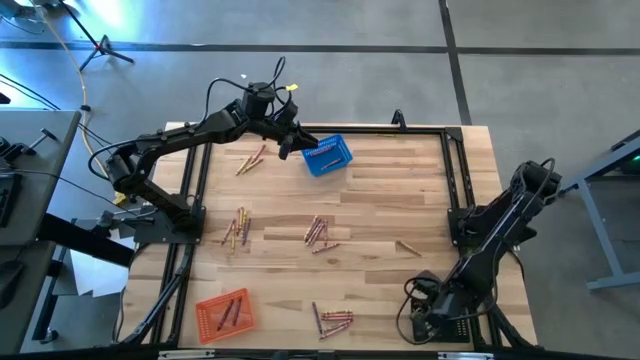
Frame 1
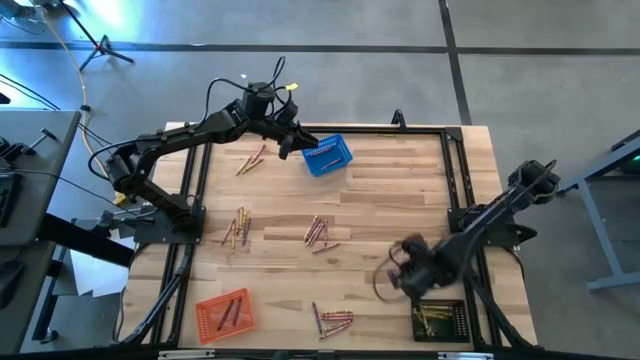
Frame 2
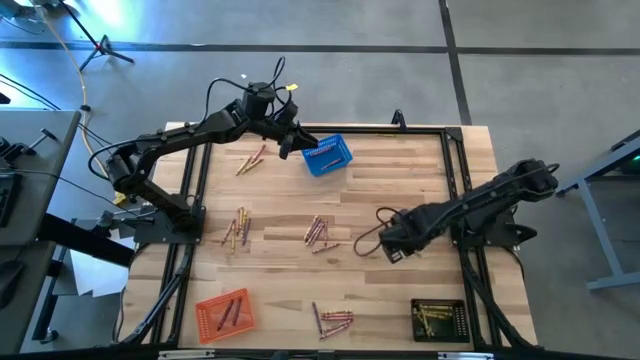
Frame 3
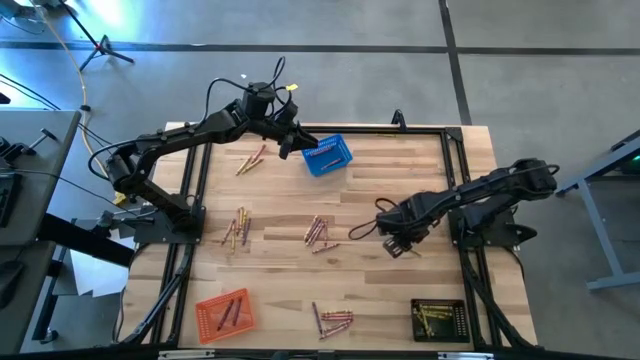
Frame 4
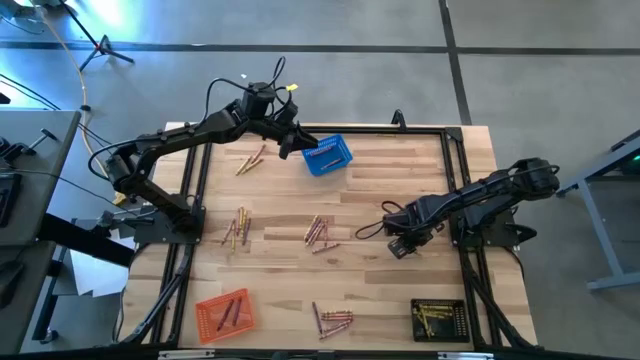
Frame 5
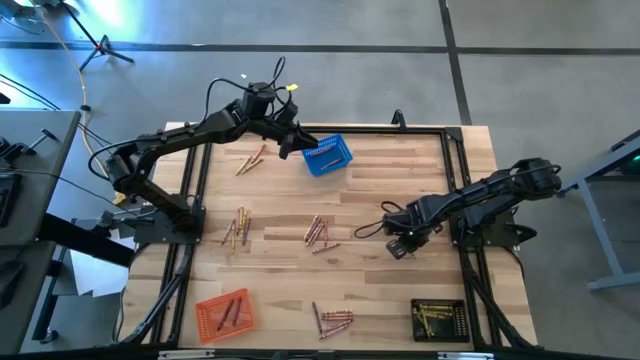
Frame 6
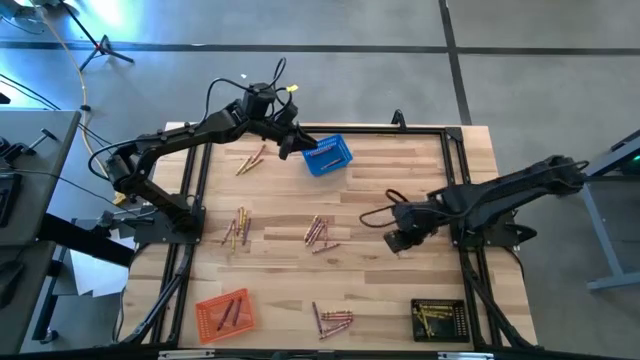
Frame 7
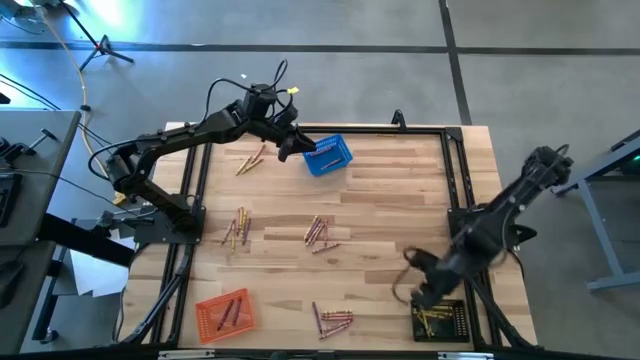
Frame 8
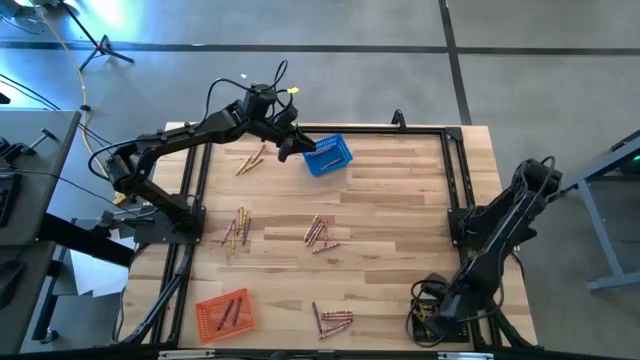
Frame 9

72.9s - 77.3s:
Task: Sort crayons
Put the yellow crayon into the black bin

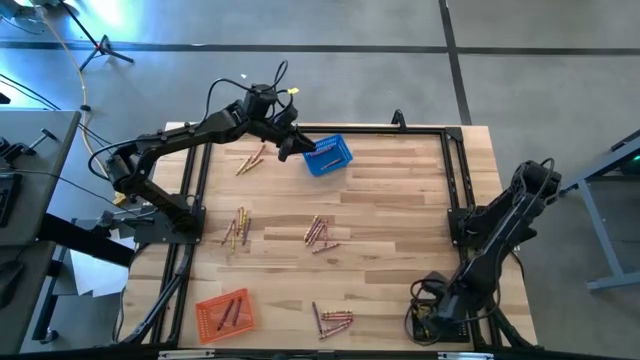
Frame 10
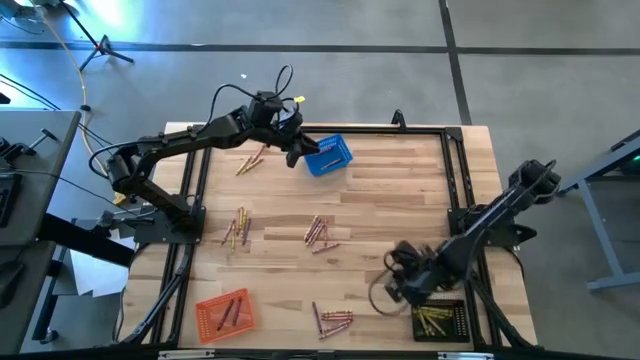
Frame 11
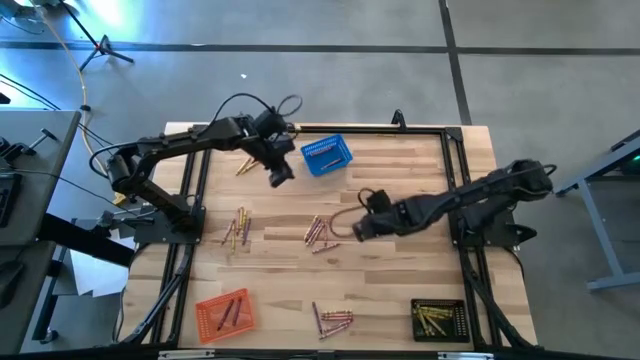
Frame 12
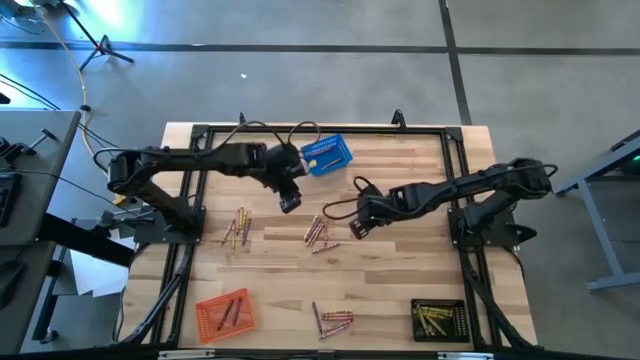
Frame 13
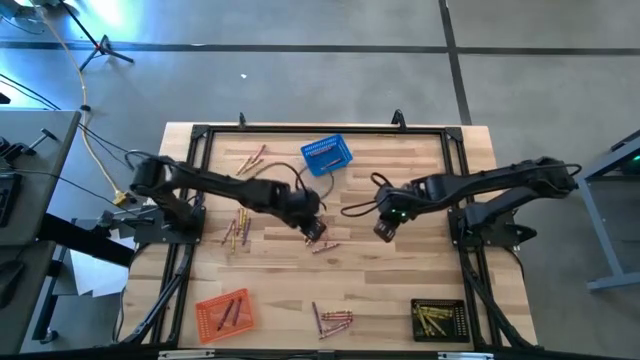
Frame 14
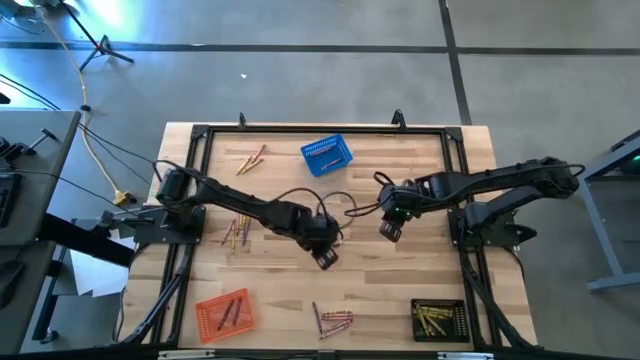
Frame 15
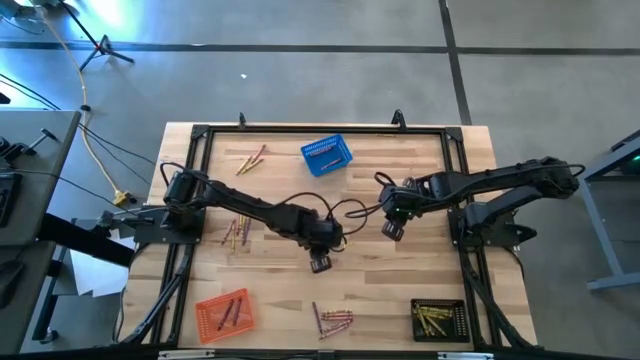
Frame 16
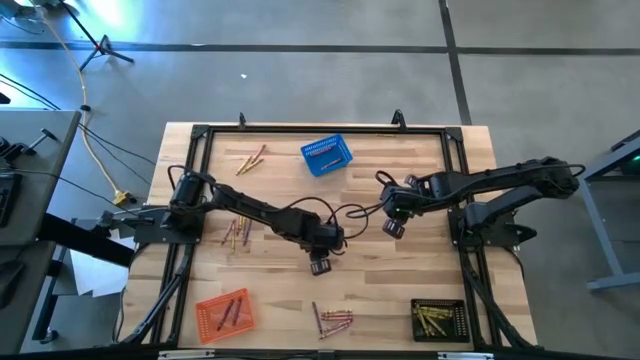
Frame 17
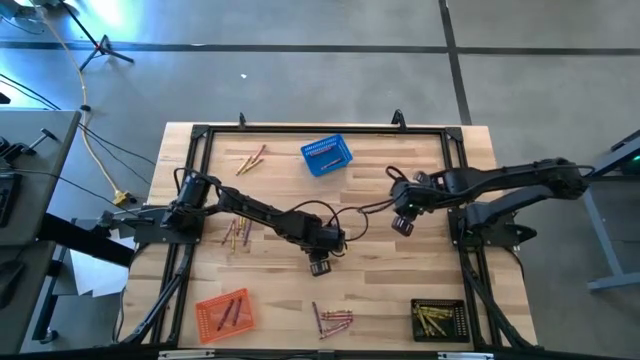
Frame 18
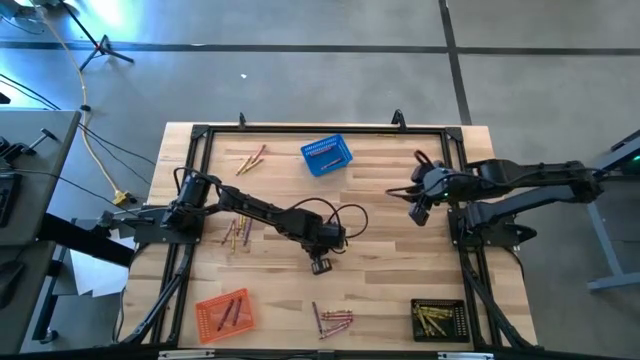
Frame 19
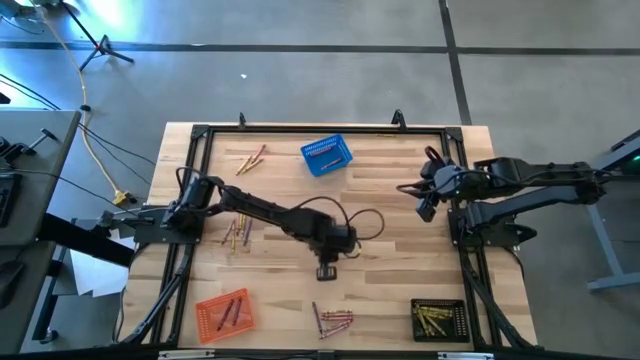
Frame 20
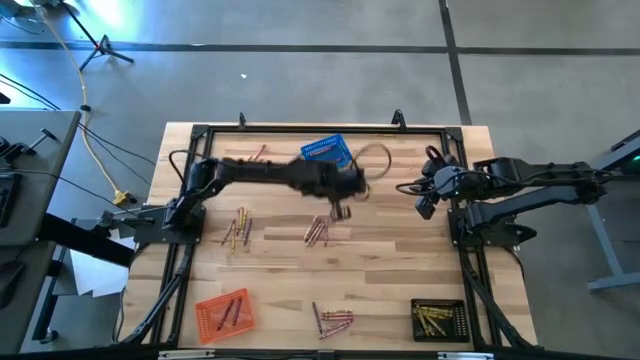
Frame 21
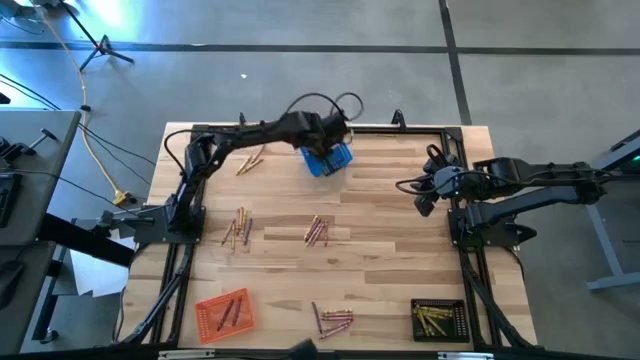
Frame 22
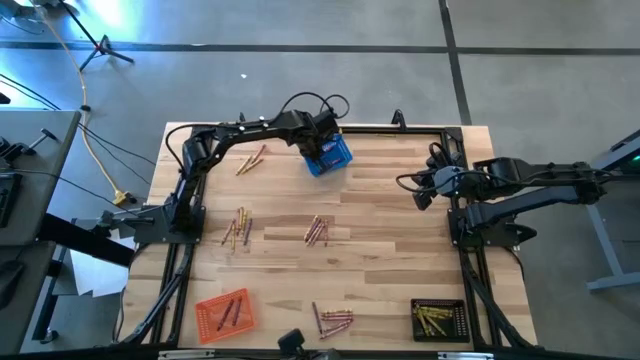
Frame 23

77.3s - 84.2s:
Put the red crayon into the blue bin

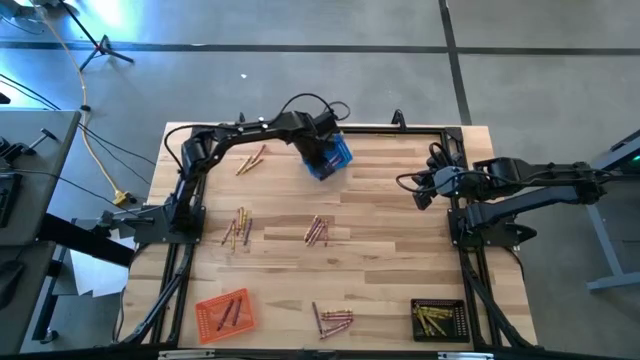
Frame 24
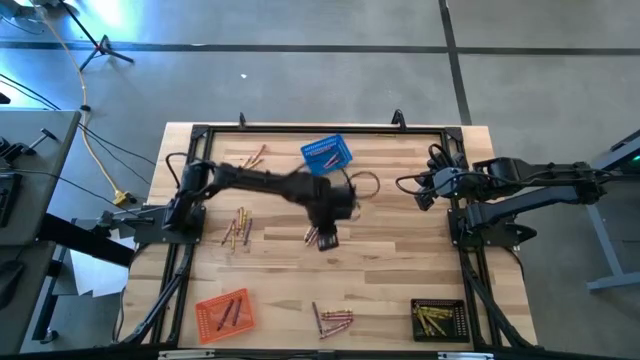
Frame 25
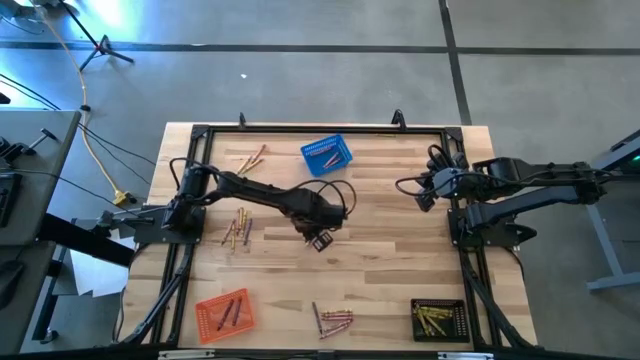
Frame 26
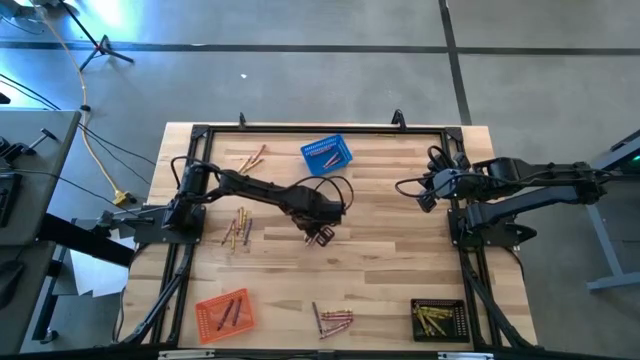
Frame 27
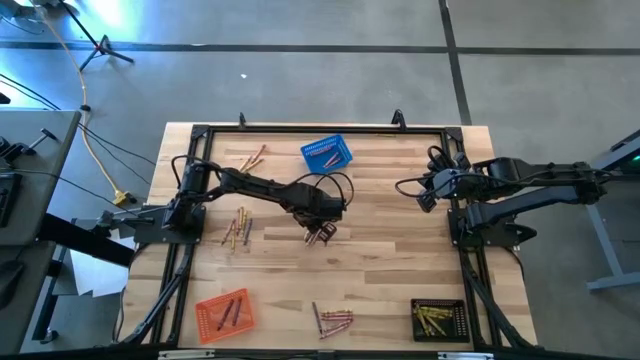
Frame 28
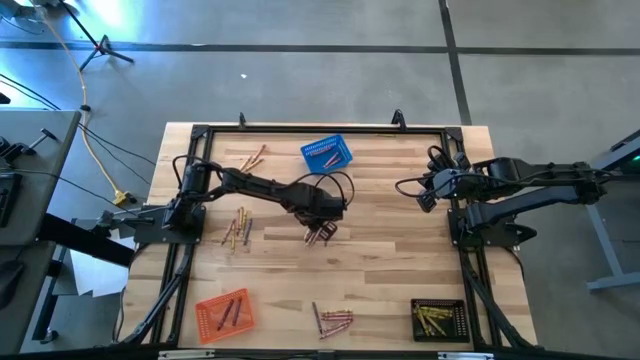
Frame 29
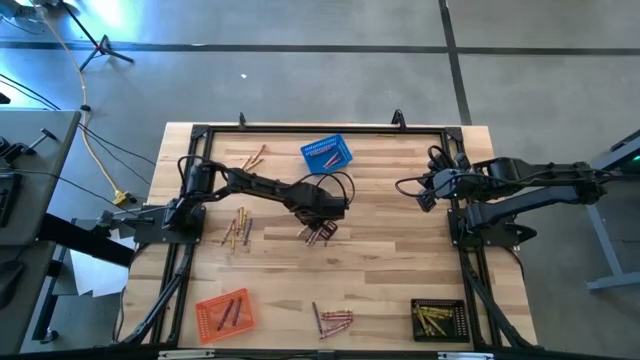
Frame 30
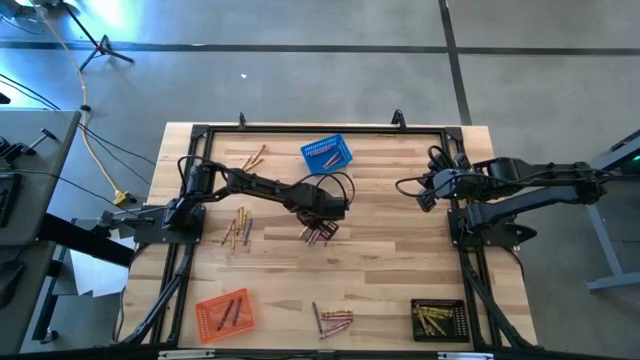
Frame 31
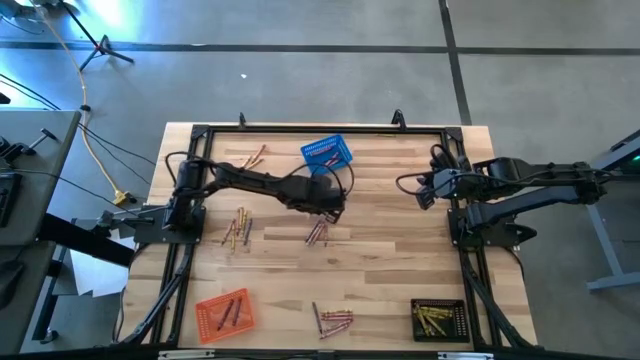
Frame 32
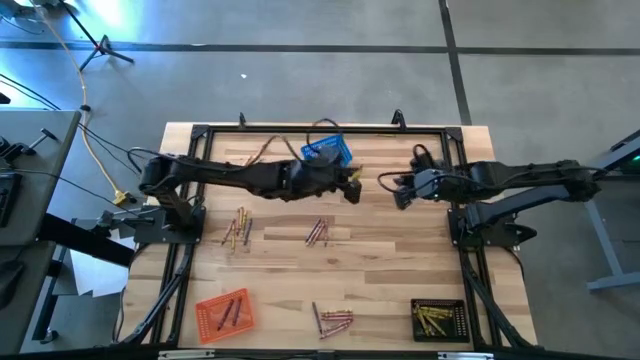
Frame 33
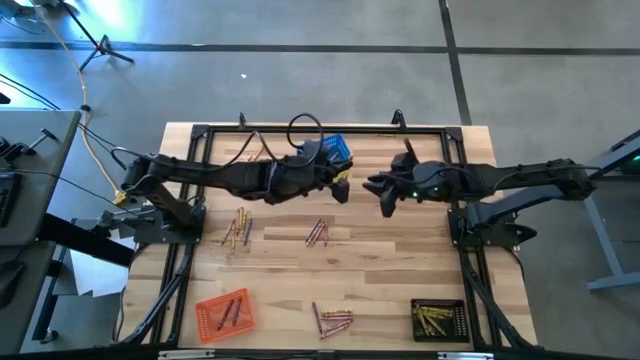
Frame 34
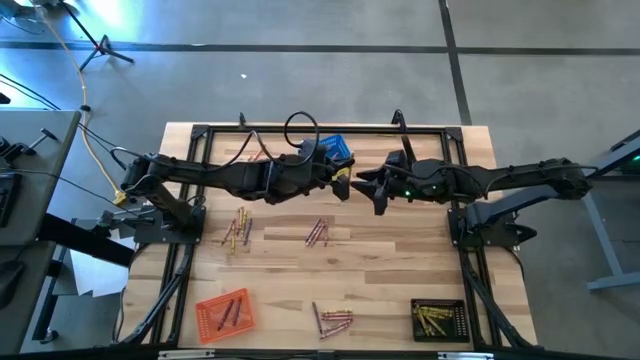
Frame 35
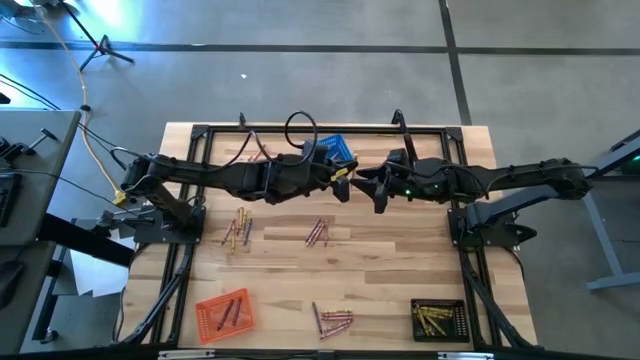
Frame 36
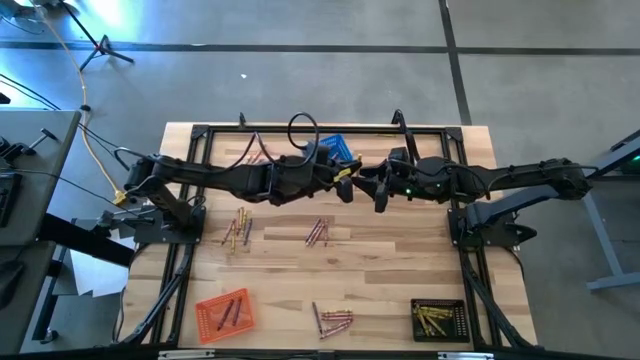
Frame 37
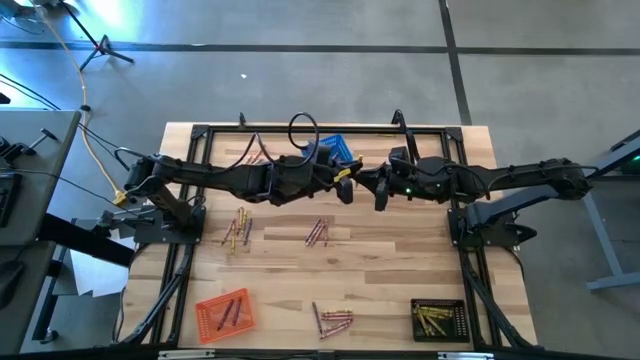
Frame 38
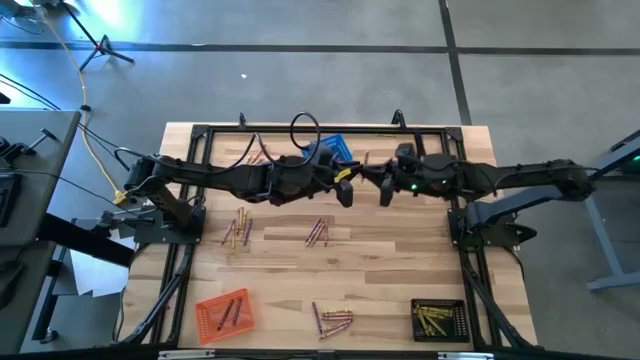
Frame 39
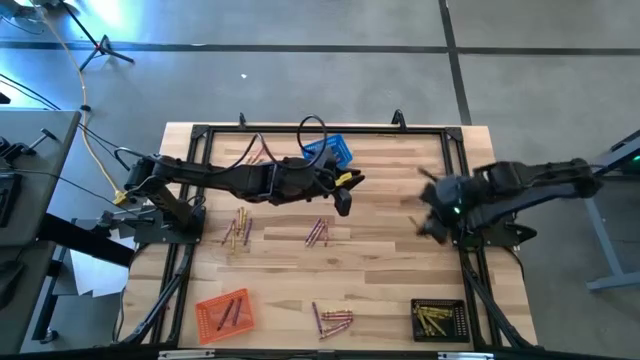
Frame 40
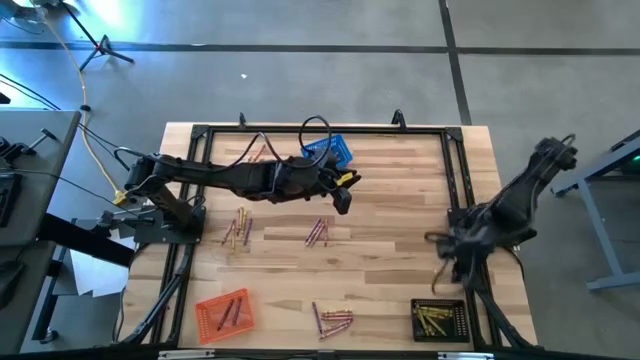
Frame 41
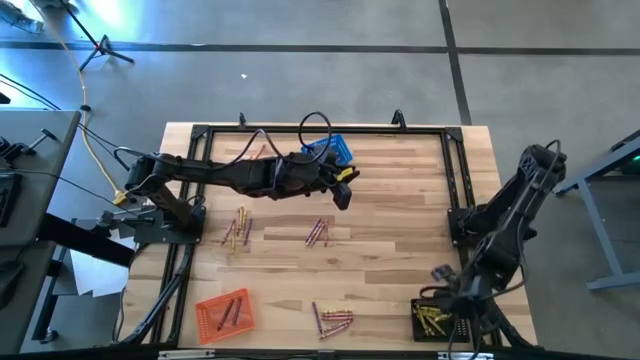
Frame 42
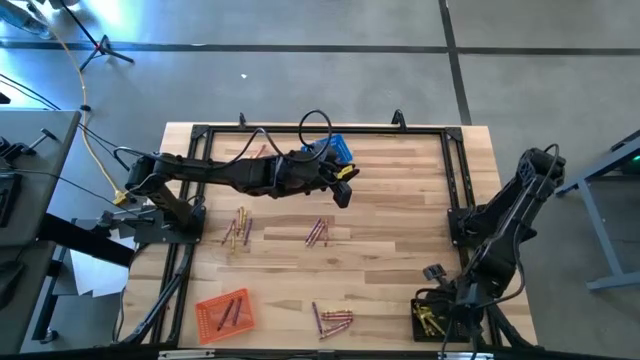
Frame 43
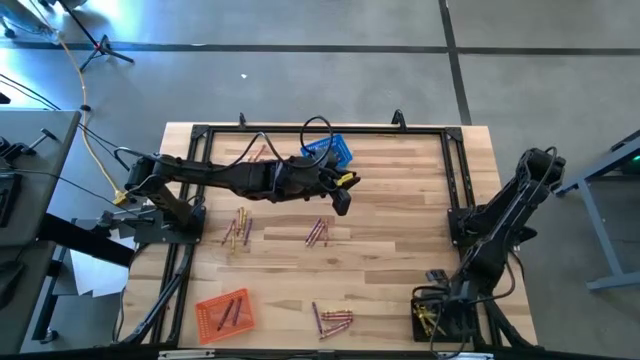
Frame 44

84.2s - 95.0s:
Put the yellow crayon into the black bin
